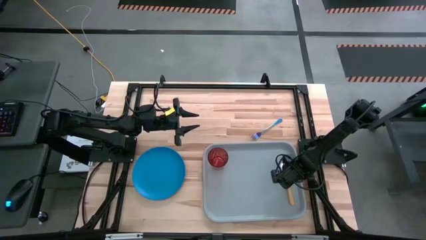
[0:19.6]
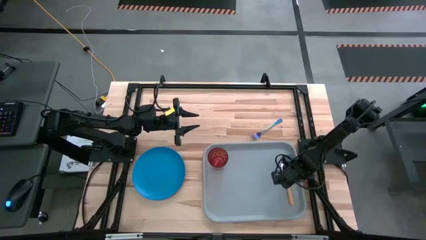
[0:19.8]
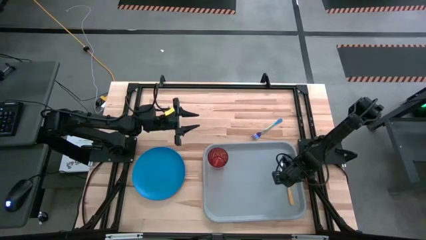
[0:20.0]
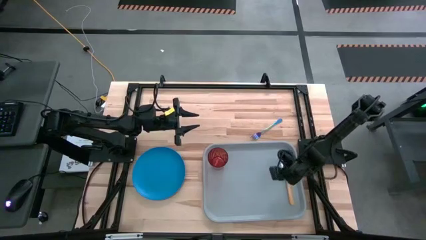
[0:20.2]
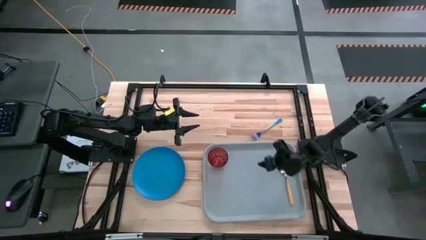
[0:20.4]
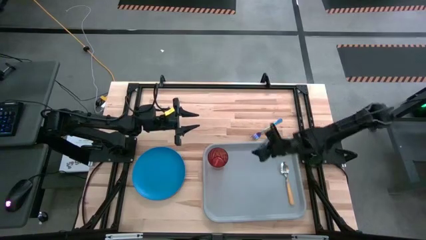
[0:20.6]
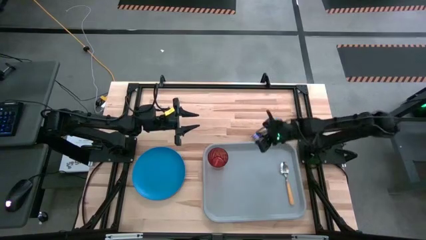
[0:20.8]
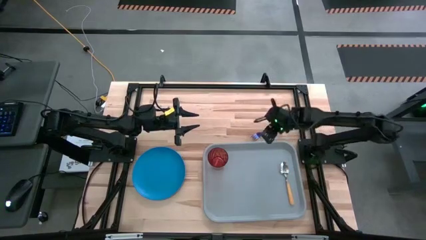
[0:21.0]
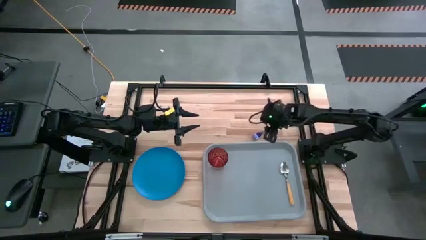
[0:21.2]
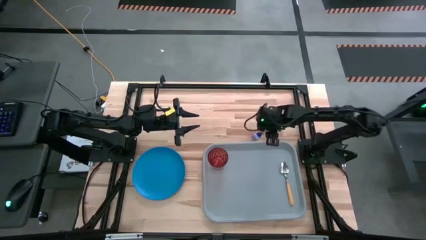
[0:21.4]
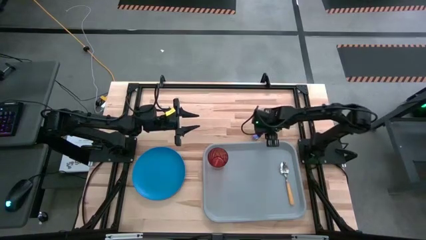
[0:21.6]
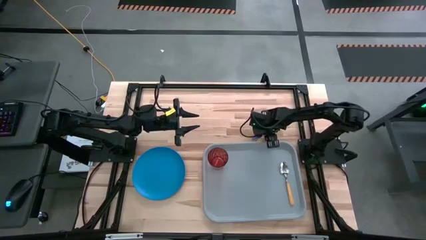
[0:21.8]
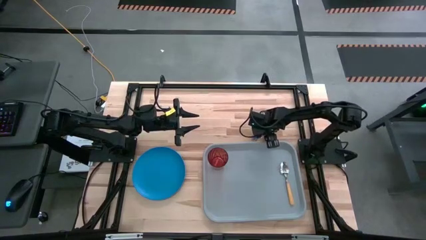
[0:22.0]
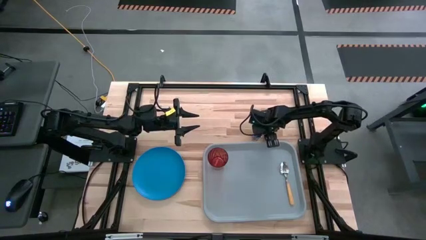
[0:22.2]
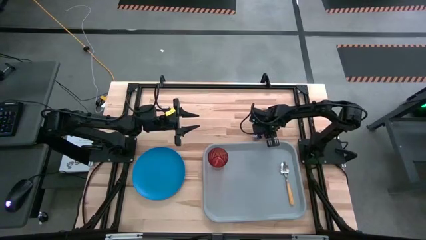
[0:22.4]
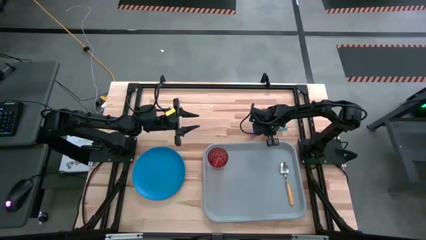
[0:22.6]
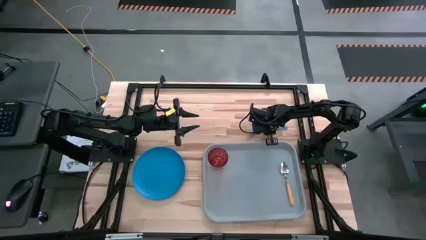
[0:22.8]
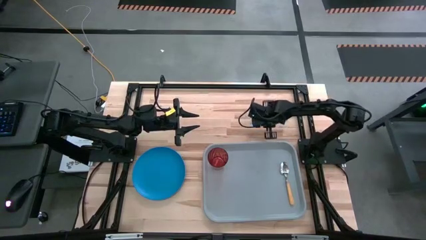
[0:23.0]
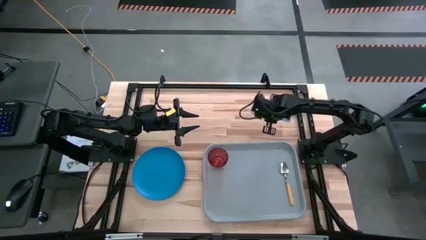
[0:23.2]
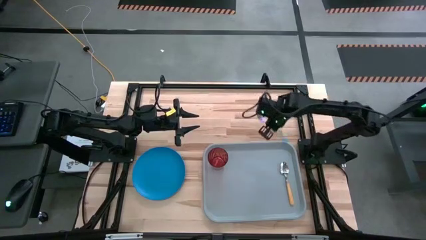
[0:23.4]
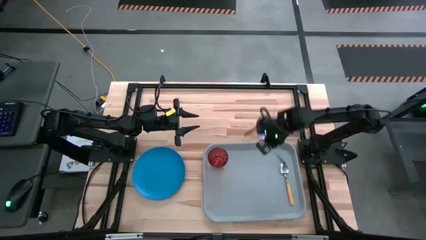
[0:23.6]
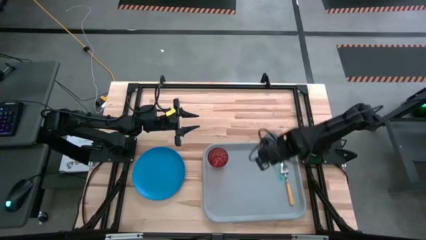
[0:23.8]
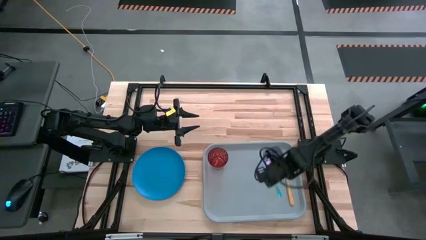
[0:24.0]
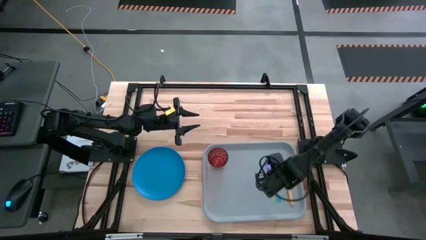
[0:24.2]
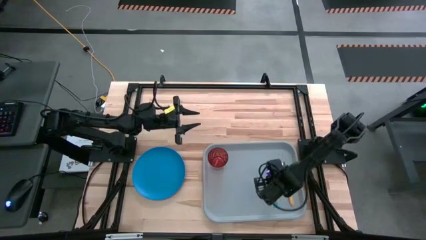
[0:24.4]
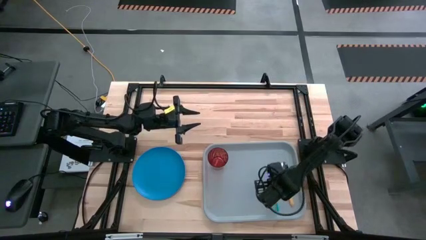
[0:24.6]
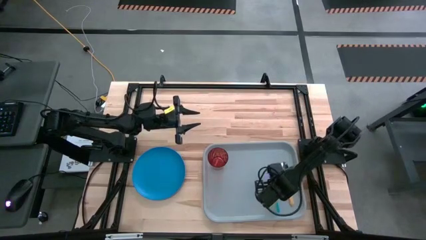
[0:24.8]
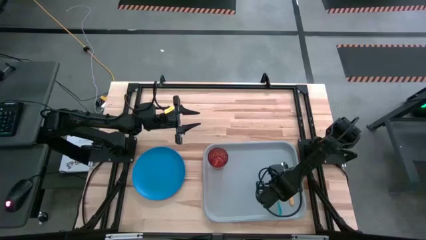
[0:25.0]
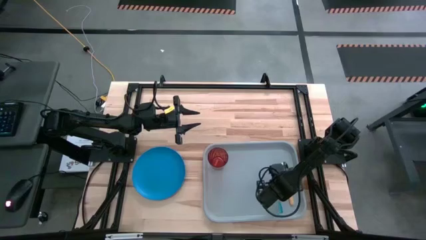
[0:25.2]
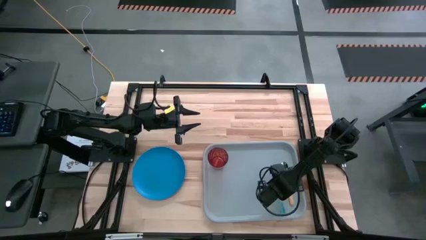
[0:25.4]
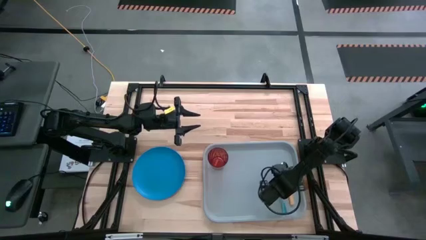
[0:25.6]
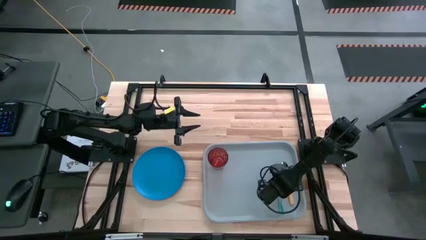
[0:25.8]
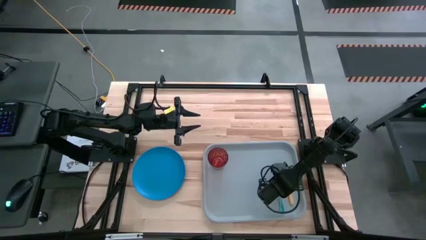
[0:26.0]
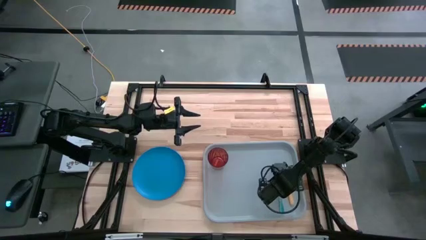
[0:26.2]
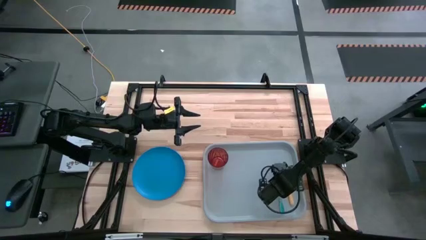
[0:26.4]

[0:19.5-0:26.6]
Task: Pick and place plate/cup/fork/spoon on tray
Put the blue fork on the gray tray to the left of the yellow spoon

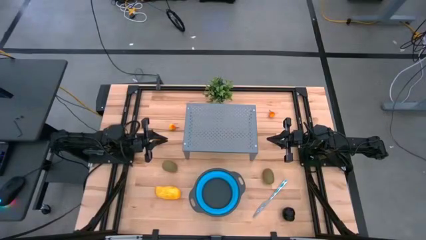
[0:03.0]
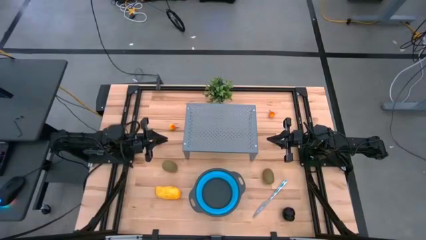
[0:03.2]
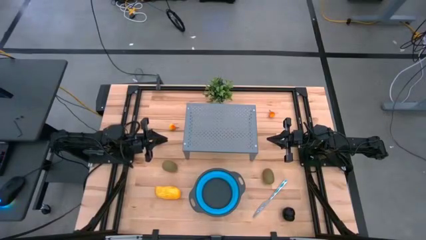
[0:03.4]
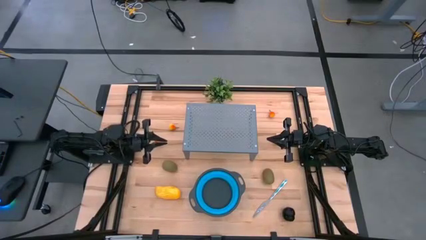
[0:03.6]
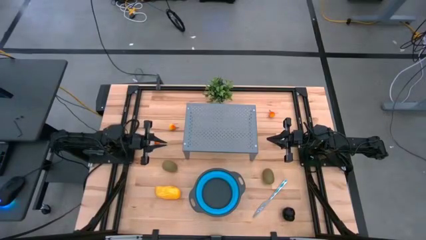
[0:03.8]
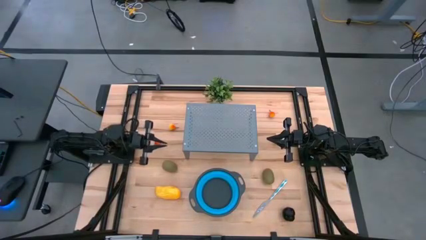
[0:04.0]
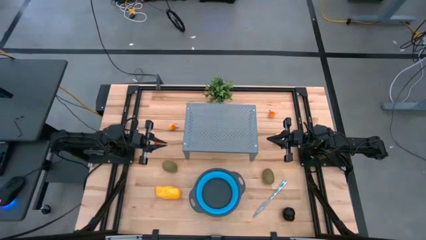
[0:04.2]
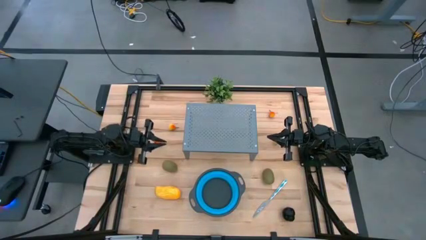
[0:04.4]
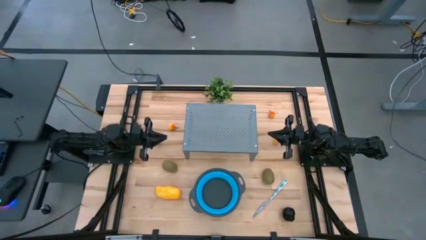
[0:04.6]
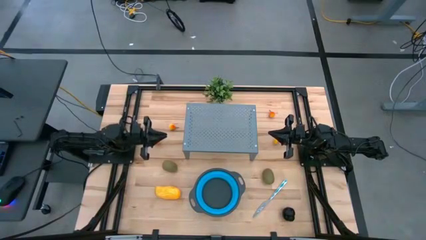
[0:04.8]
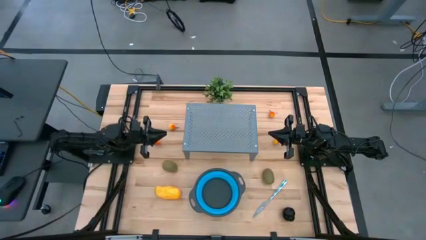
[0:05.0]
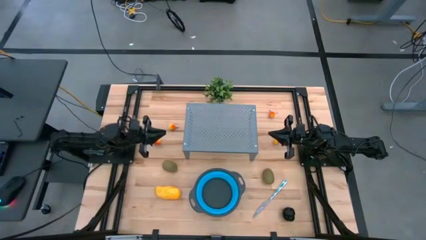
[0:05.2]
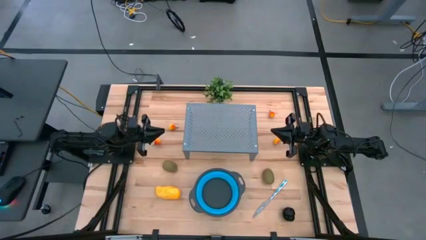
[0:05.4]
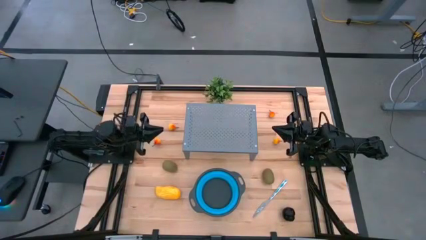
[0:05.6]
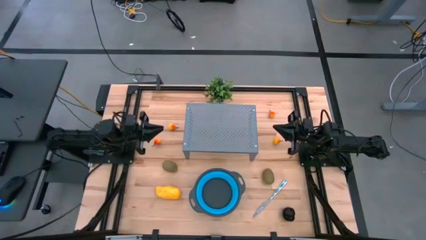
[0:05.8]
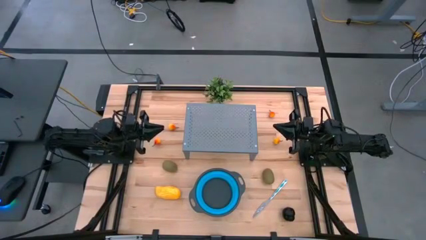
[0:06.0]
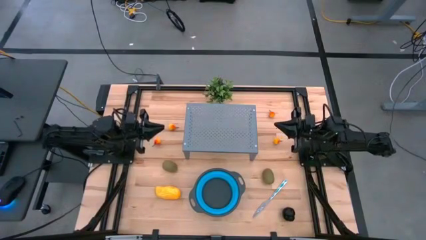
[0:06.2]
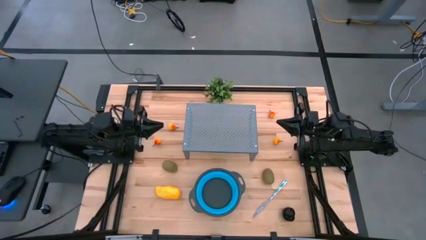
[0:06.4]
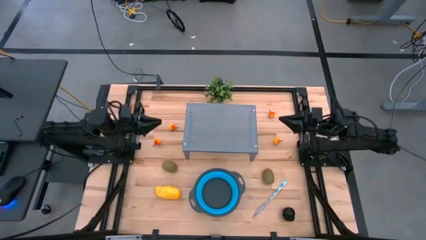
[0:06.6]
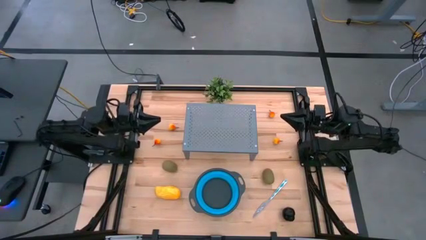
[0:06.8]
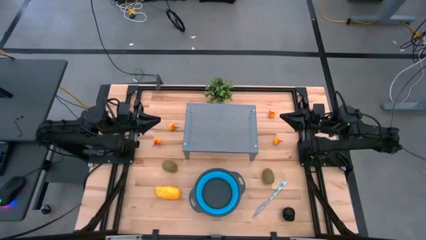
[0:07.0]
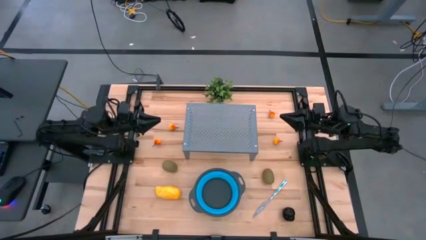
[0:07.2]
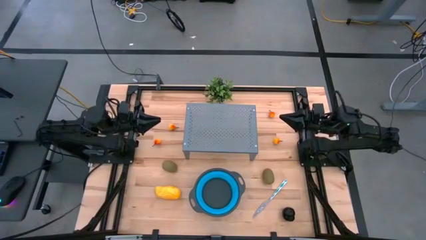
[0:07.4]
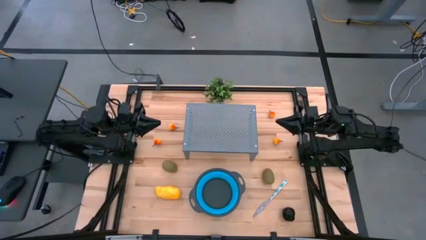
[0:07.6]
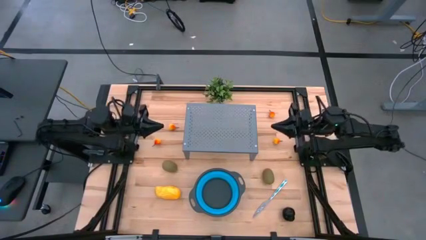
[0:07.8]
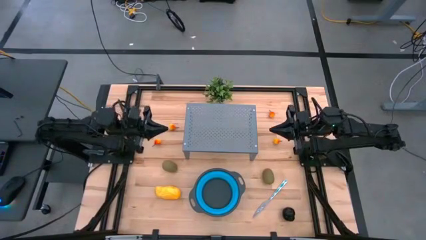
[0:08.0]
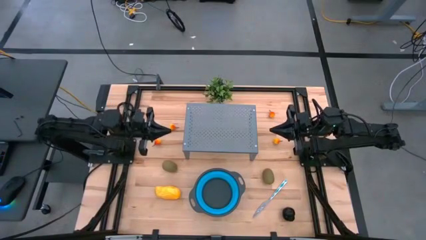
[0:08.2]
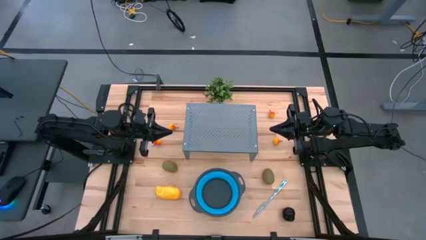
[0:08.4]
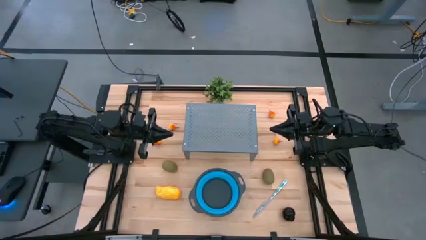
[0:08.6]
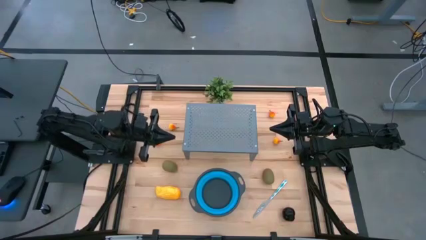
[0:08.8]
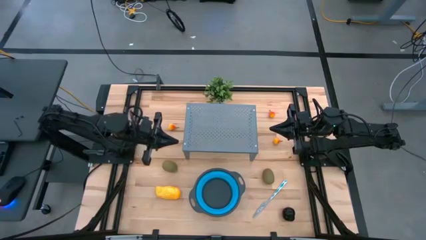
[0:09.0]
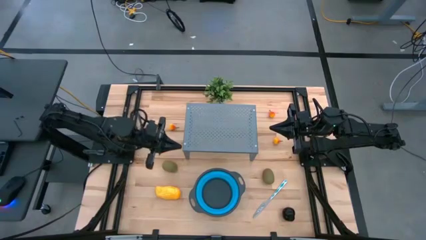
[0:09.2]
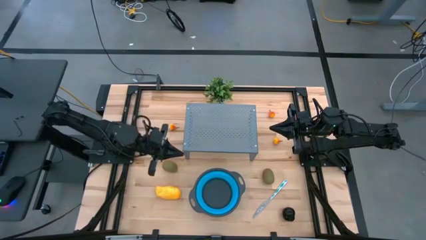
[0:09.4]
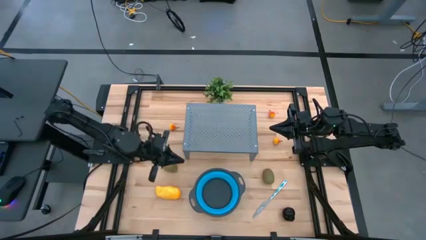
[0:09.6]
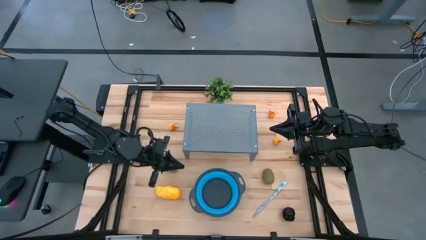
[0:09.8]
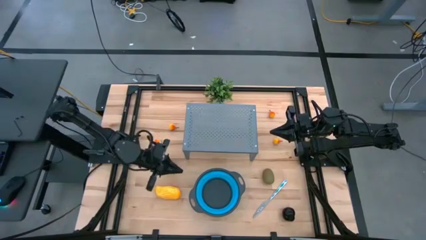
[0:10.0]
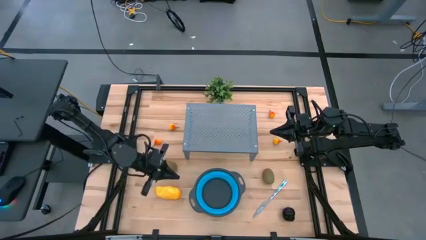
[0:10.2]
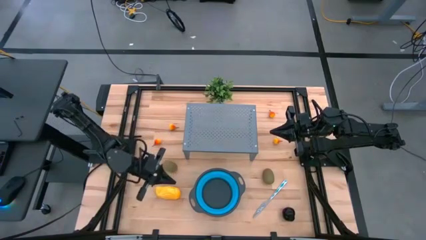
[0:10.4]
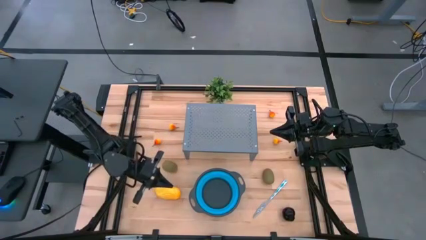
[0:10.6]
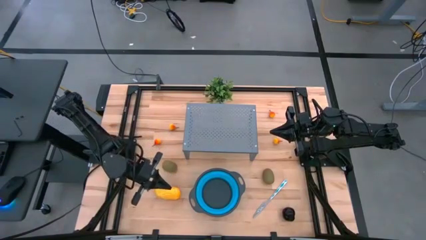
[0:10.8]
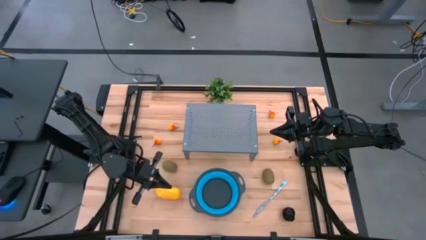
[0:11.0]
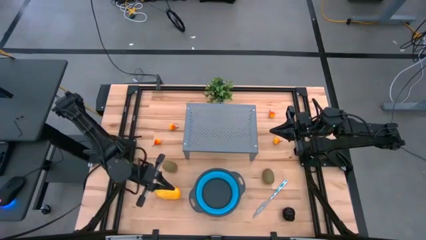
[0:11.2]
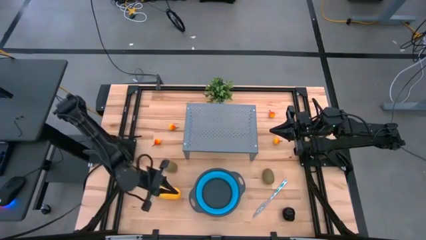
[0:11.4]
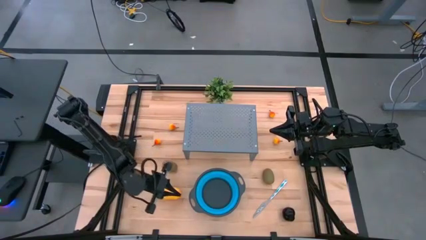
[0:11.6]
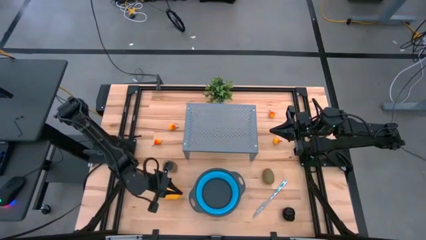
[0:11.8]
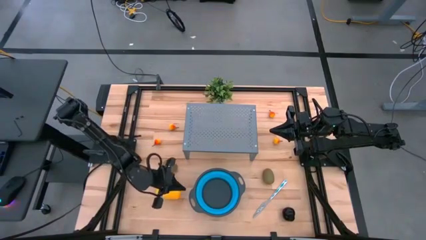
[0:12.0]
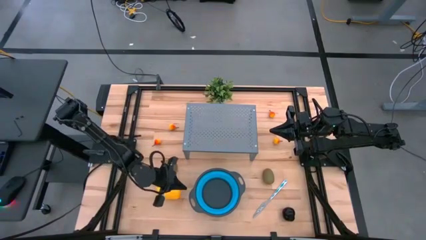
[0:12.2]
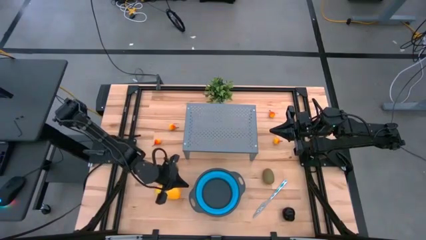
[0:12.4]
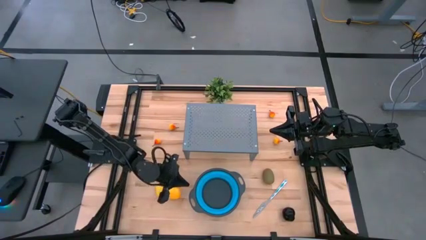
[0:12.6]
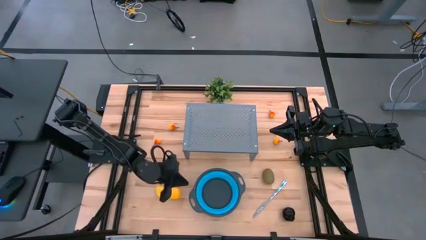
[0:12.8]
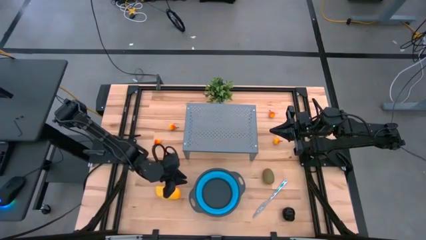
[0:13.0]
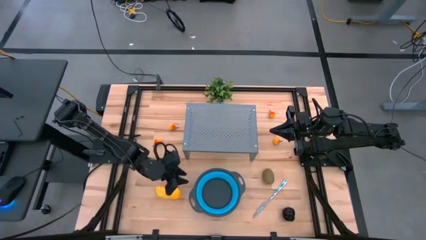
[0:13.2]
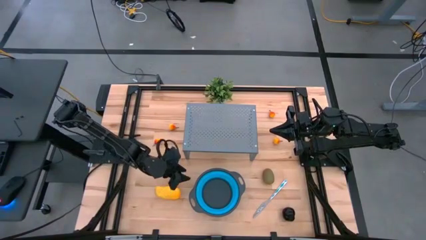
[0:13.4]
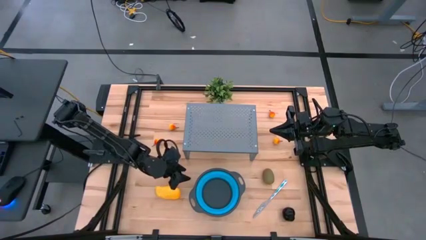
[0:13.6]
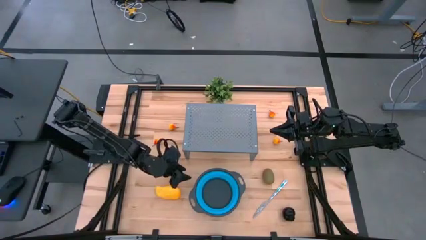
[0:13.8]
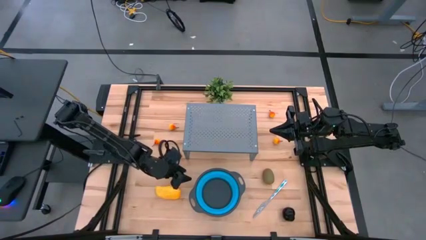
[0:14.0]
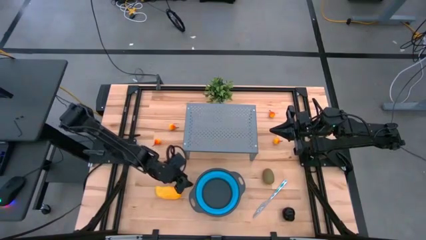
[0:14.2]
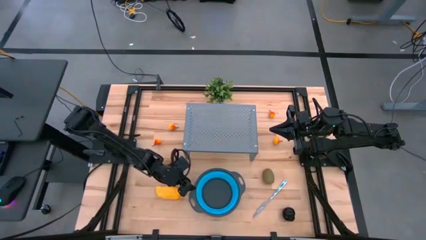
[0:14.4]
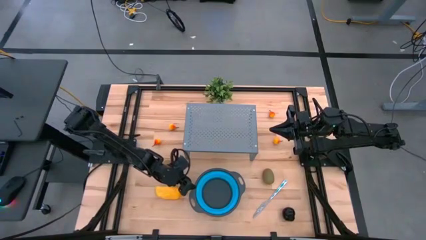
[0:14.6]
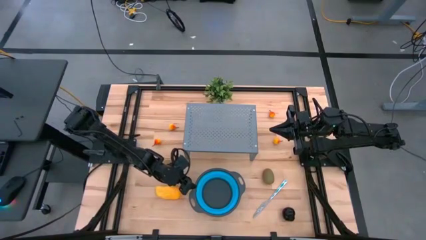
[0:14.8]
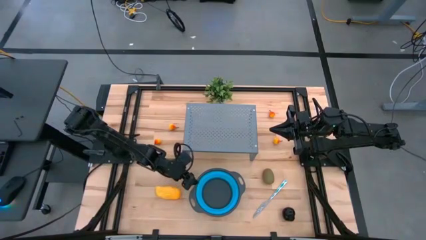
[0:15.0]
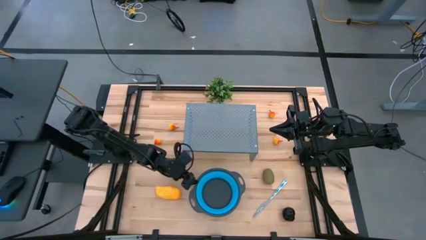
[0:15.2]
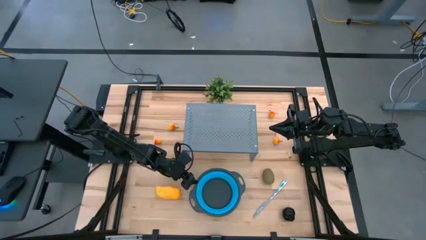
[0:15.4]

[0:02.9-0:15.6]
Task: Pick & Place Fruit
Put the strainer bowl on the shelf
